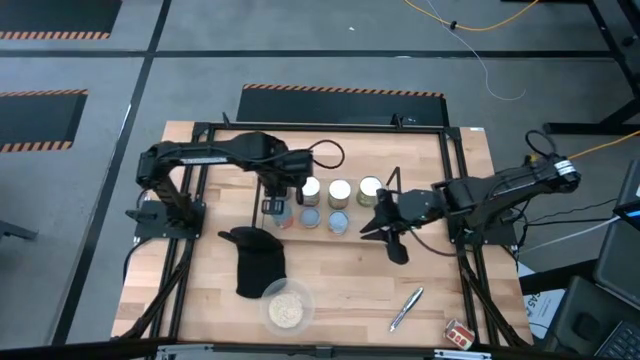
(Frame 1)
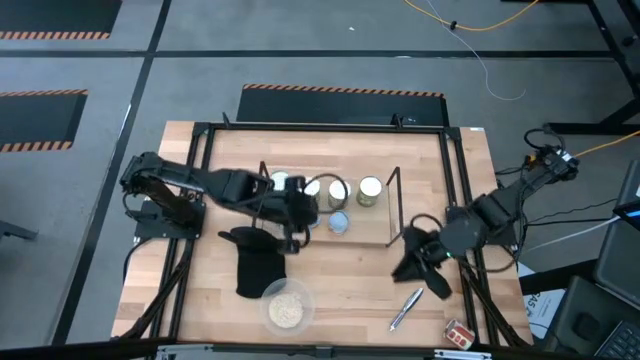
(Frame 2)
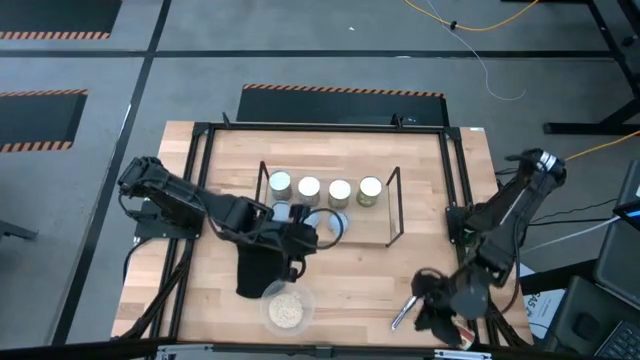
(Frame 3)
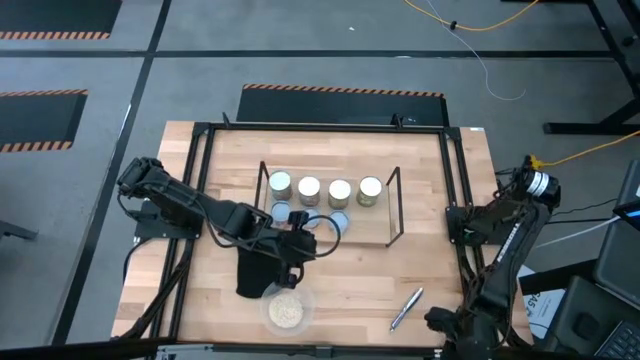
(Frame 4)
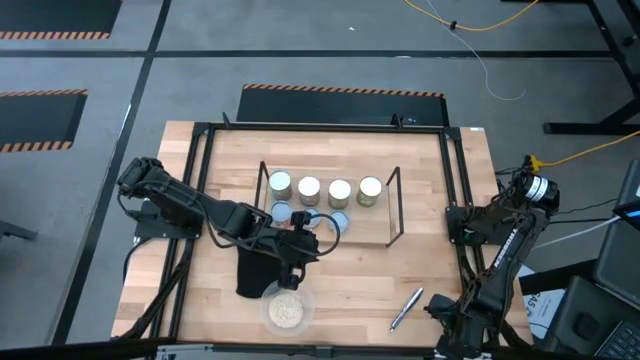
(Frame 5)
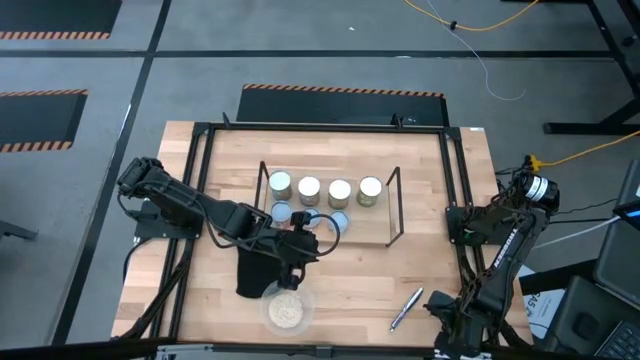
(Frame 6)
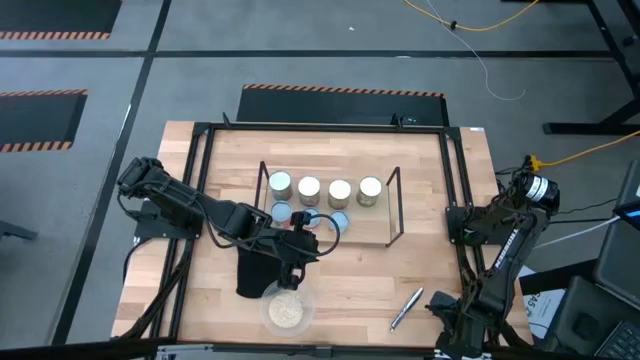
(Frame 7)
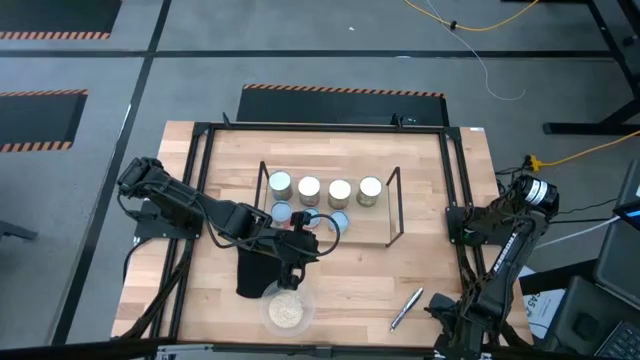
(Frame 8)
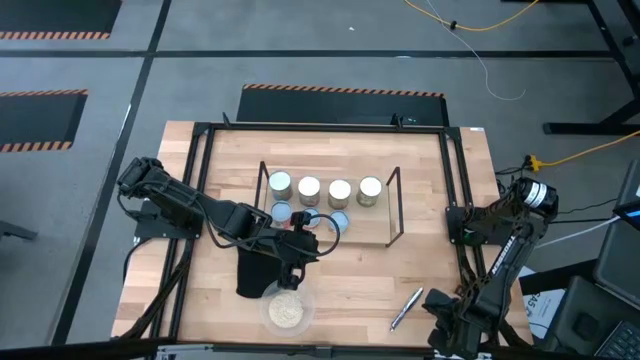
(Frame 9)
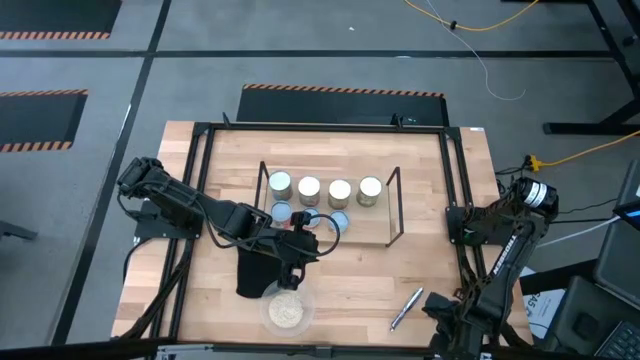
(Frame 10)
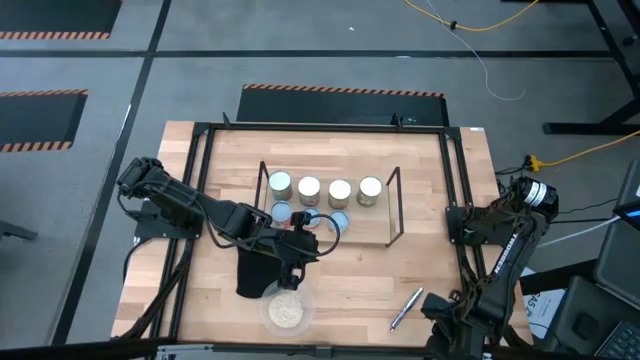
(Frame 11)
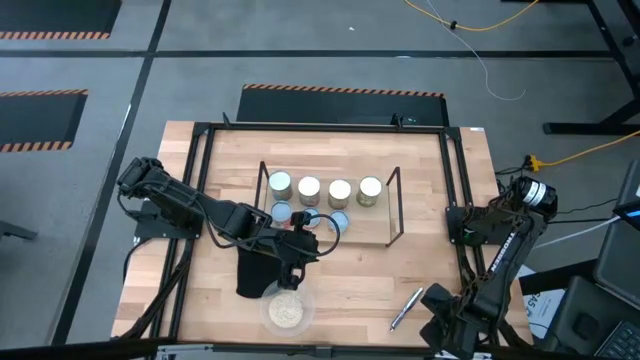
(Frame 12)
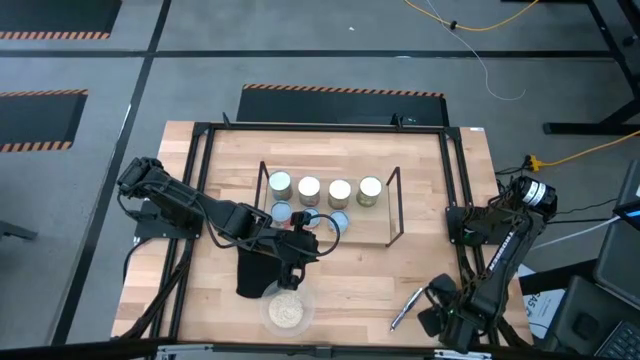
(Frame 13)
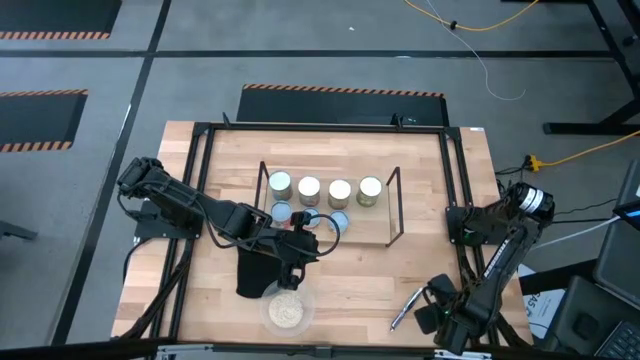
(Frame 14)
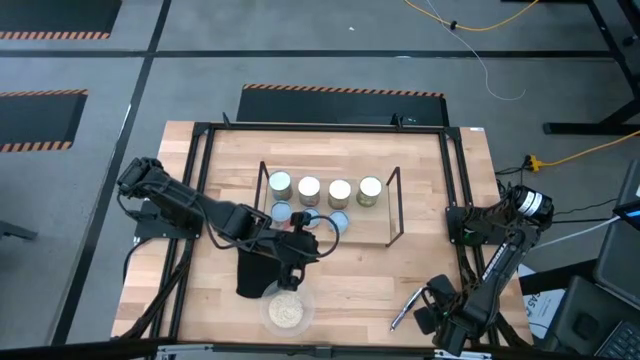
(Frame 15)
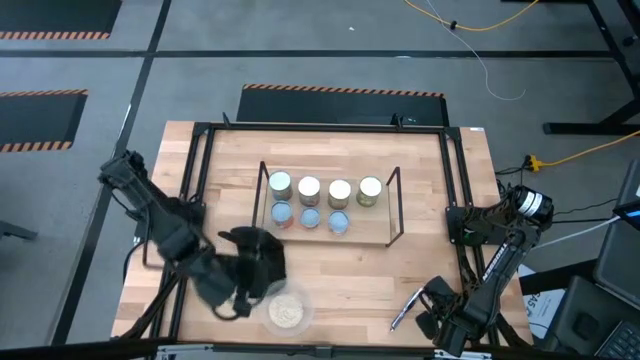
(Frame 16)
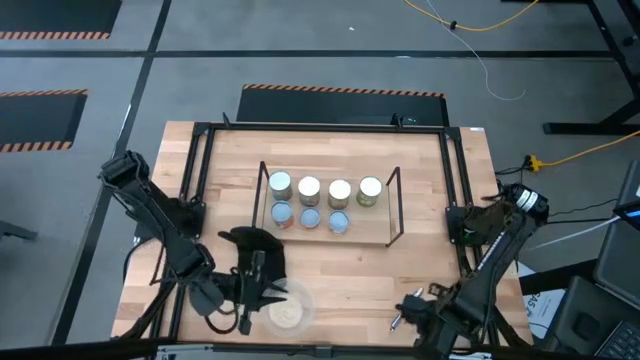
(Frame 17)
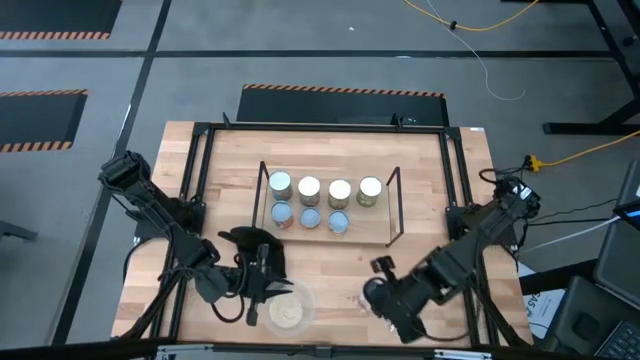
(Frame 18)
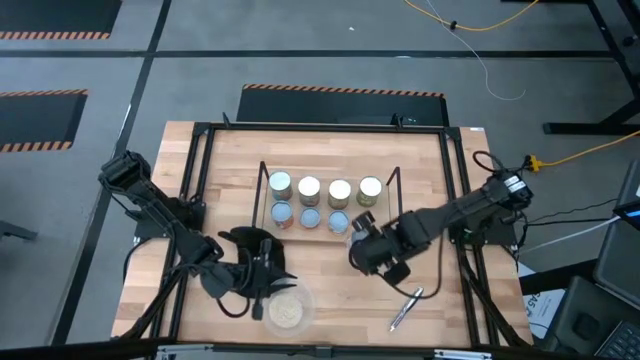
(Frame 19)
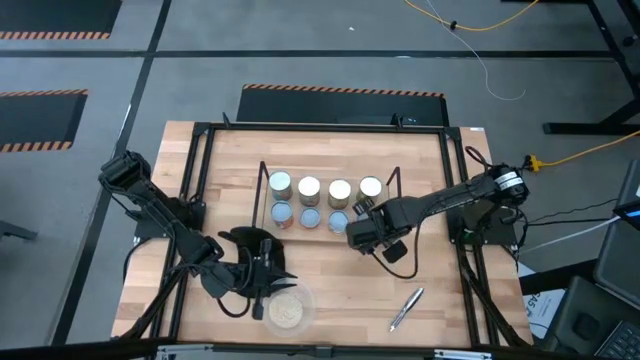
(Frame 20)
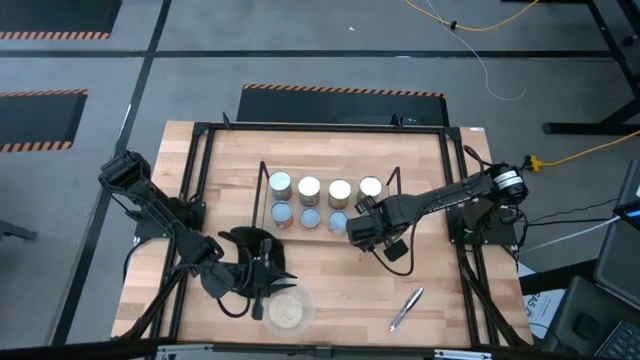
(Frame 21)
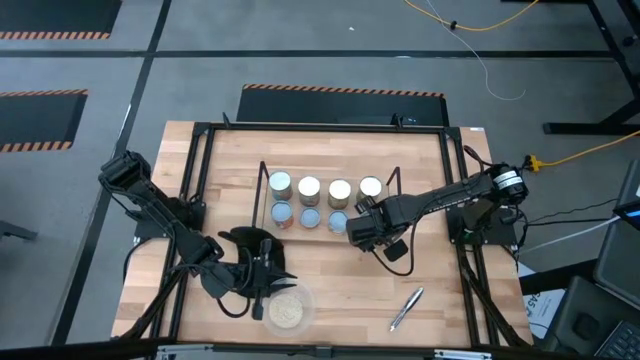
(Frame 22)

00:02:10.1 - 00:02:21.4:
Task: Pick and place cans onto a shelf
Put the small canned diced tomatoes on the shelf

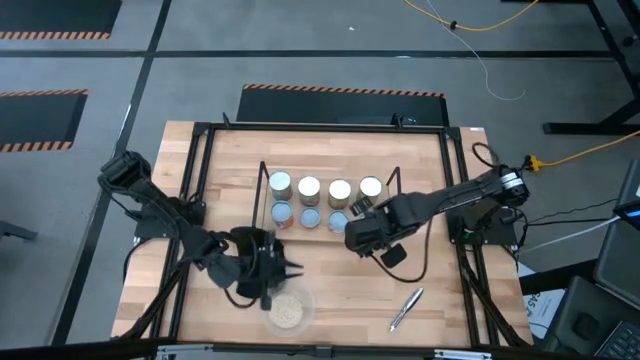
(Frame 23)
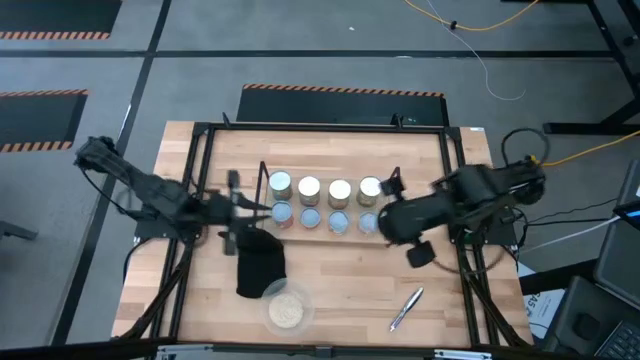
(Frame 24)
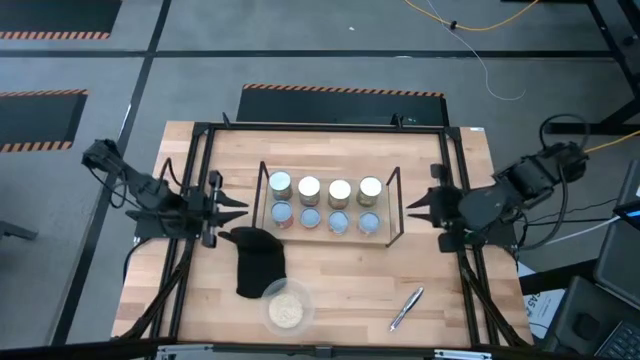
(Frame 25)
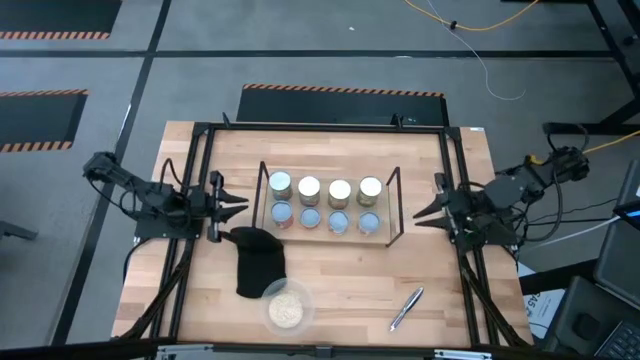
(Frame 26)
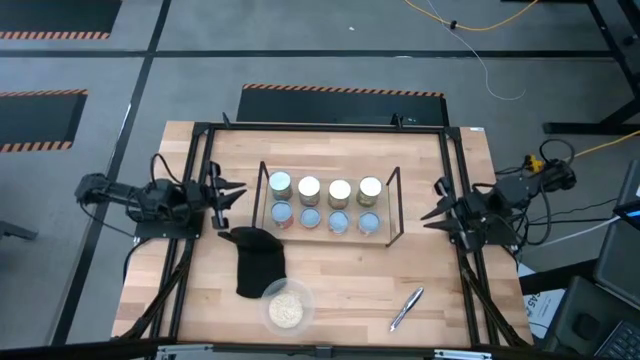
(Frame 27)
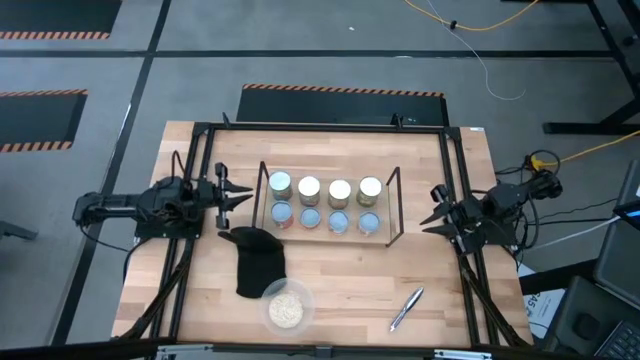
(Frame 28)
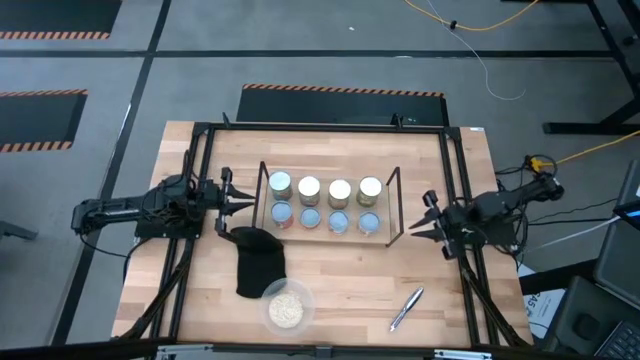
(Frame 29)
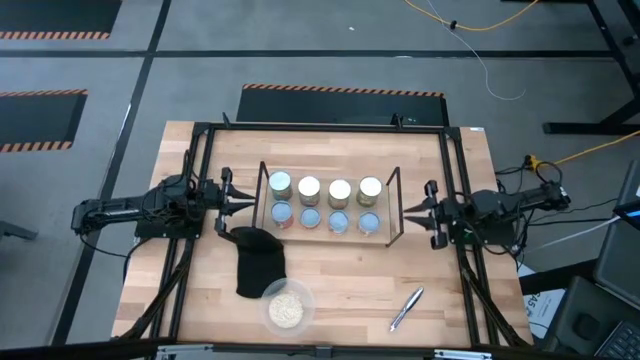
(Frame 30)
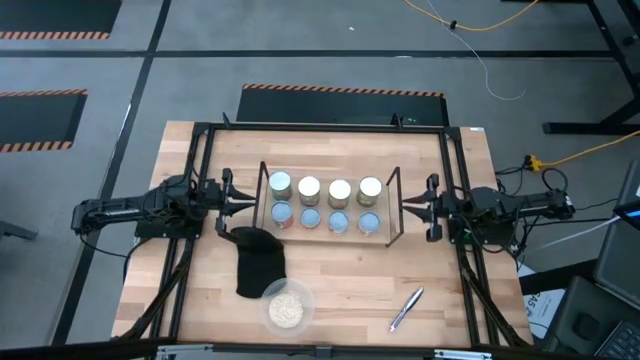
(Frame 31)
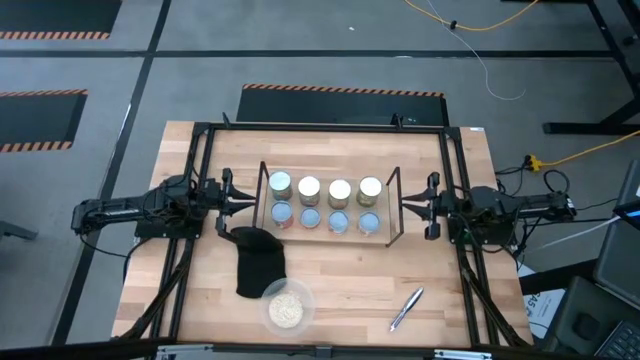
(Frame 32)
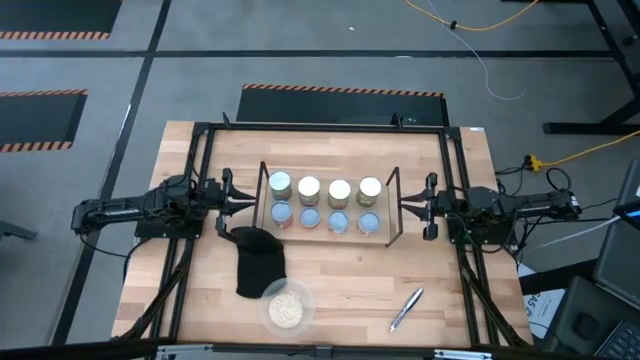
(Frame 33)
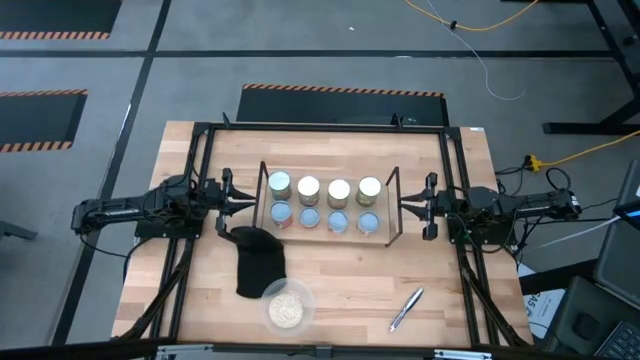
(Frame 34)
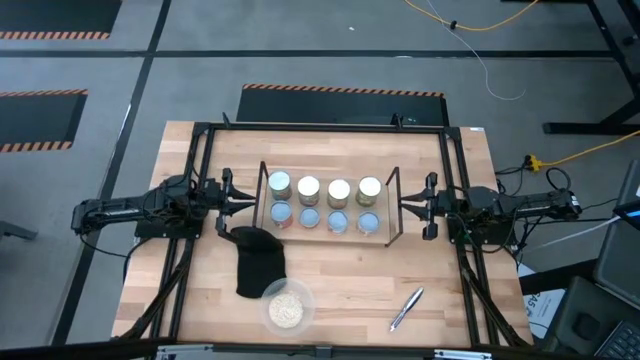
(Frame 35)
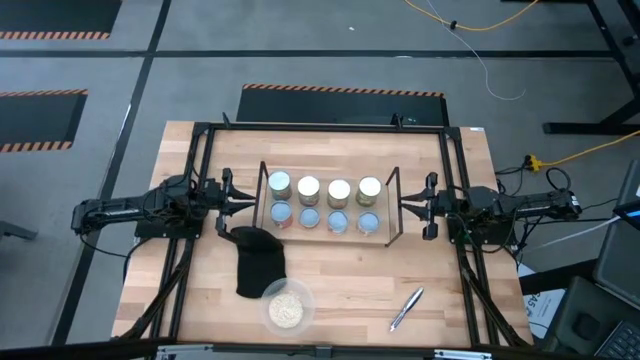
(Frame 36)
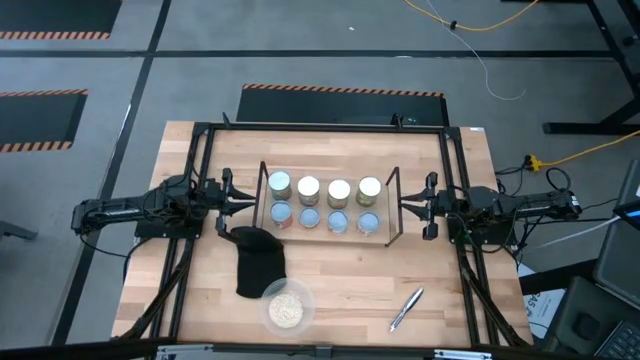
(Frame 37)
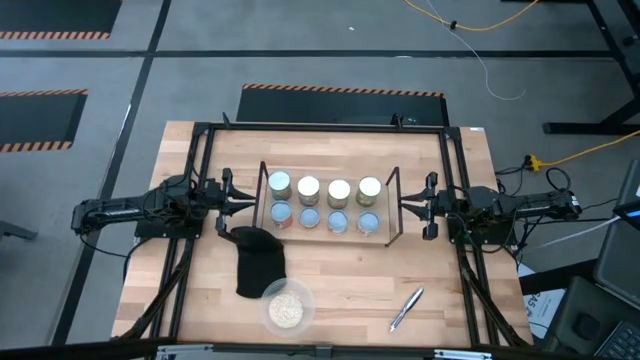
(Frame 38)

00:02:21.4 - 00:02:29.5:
Return to Home Position
